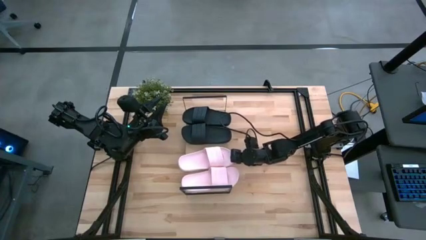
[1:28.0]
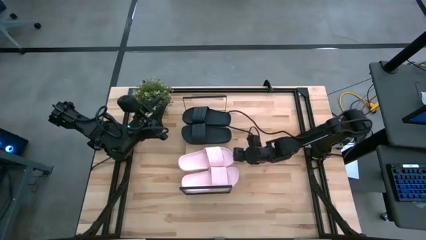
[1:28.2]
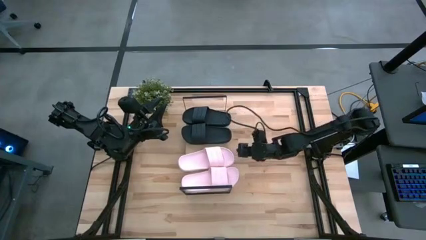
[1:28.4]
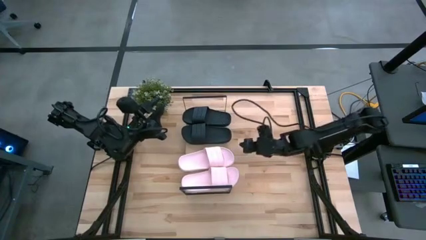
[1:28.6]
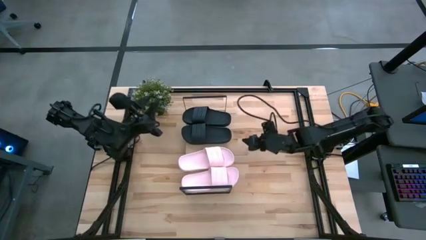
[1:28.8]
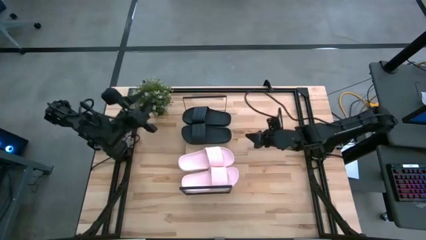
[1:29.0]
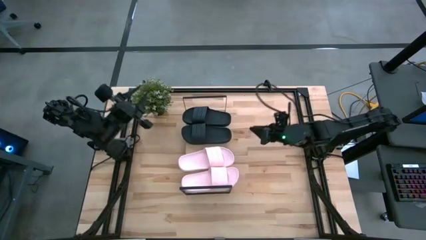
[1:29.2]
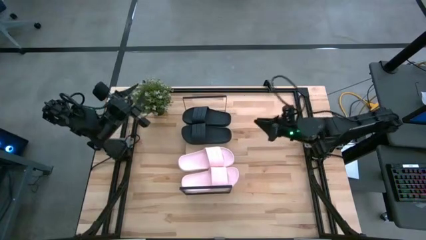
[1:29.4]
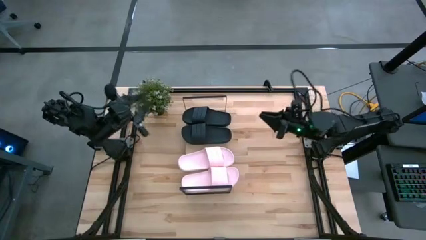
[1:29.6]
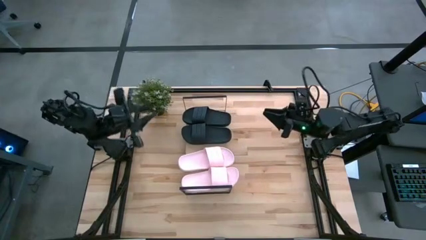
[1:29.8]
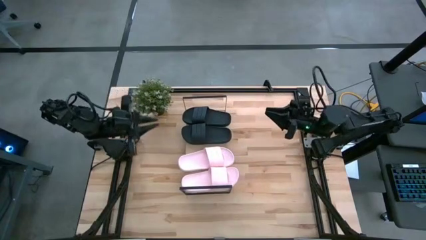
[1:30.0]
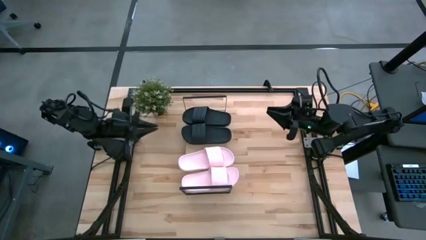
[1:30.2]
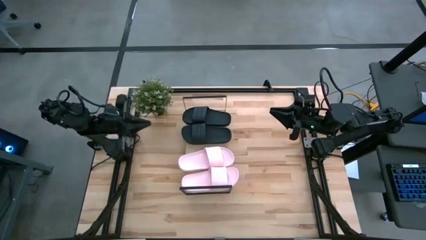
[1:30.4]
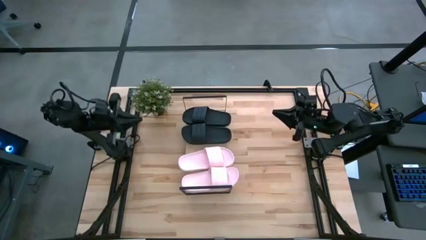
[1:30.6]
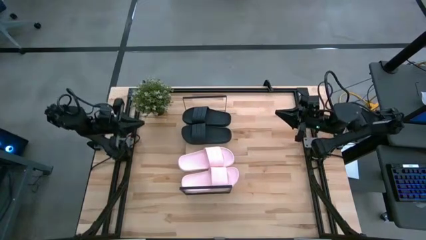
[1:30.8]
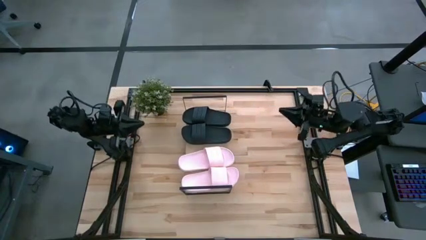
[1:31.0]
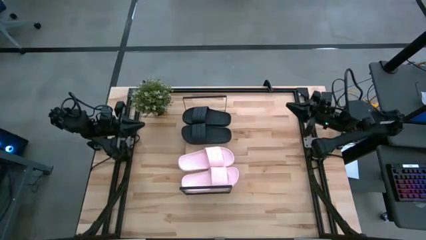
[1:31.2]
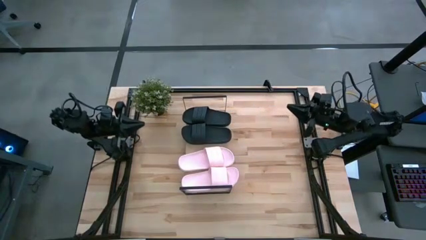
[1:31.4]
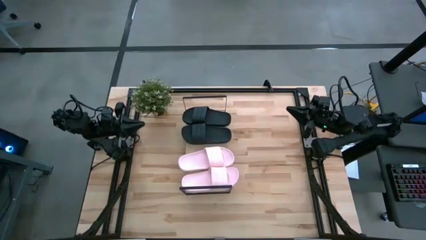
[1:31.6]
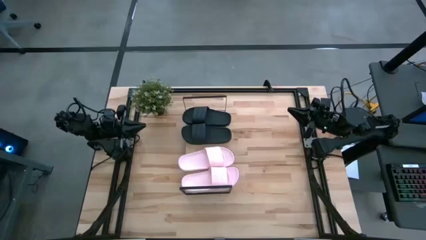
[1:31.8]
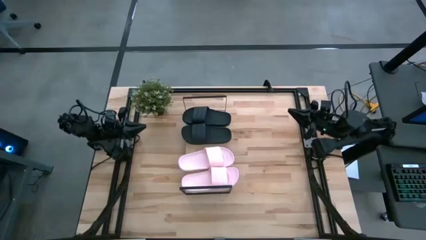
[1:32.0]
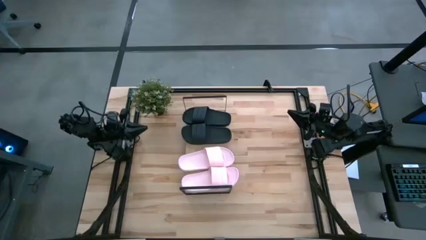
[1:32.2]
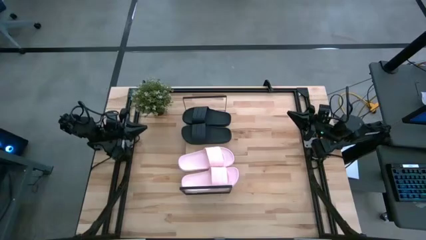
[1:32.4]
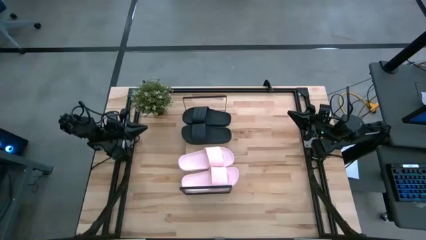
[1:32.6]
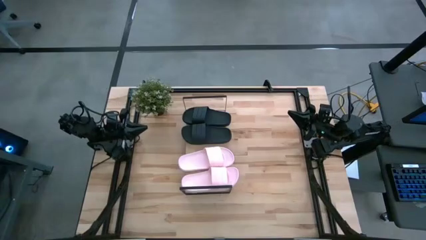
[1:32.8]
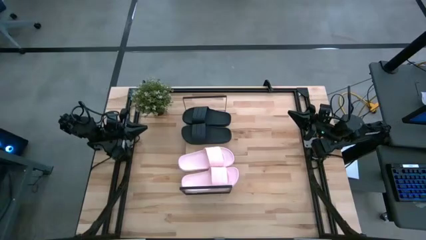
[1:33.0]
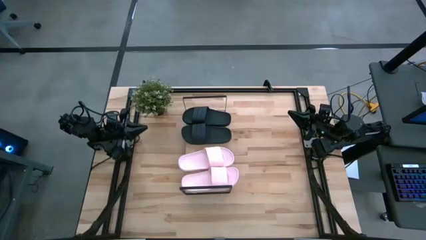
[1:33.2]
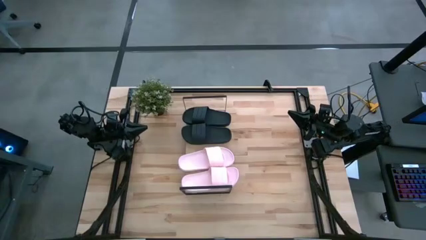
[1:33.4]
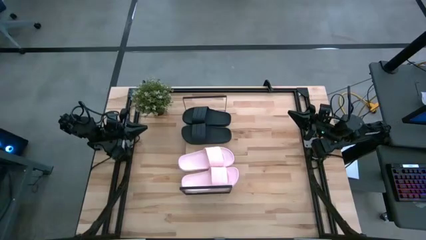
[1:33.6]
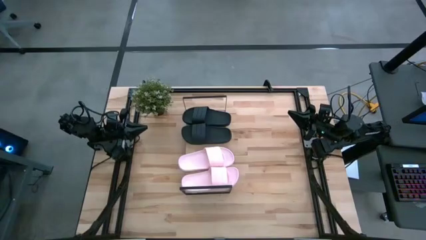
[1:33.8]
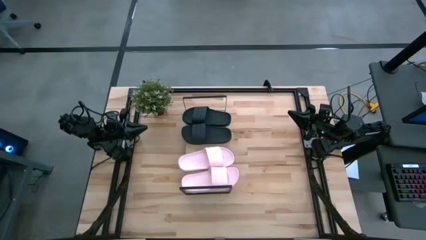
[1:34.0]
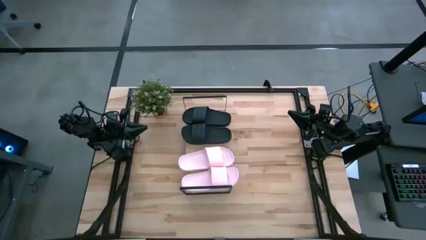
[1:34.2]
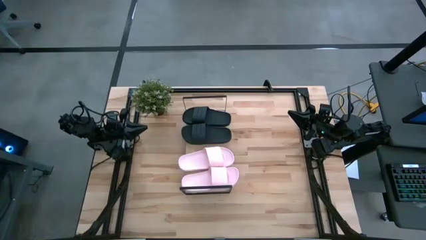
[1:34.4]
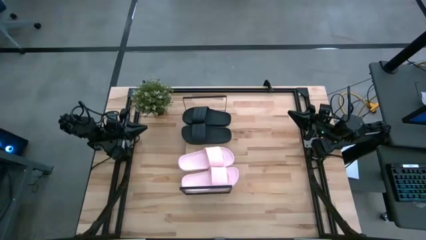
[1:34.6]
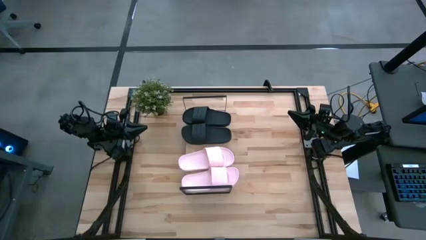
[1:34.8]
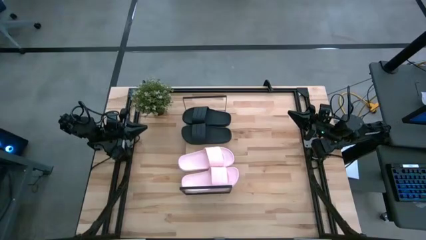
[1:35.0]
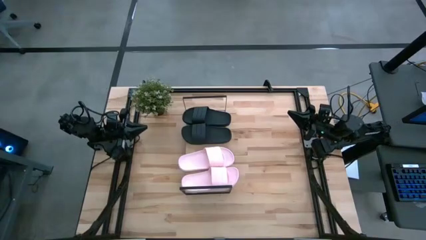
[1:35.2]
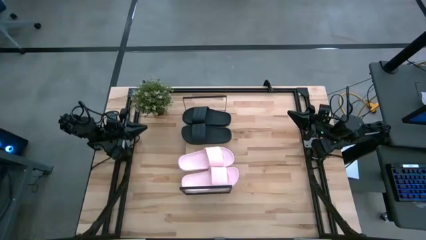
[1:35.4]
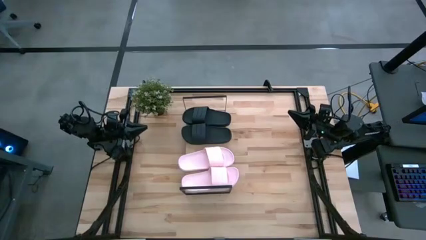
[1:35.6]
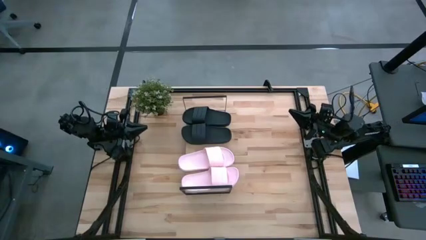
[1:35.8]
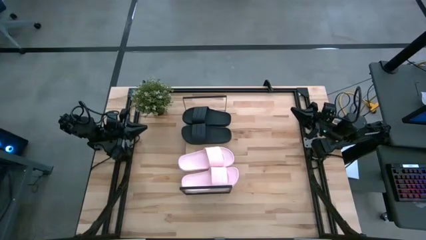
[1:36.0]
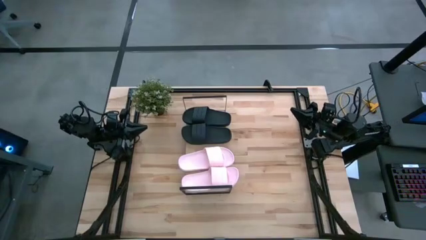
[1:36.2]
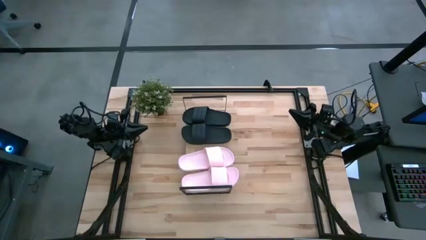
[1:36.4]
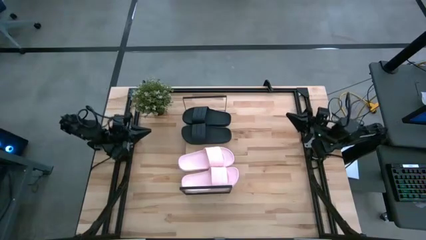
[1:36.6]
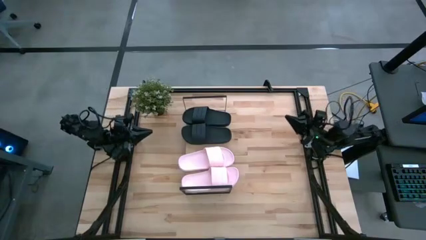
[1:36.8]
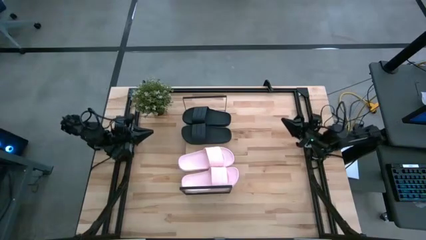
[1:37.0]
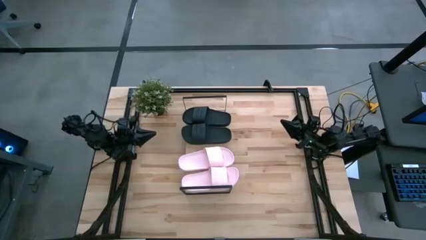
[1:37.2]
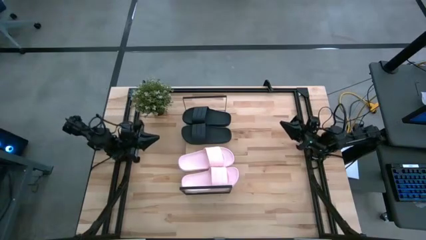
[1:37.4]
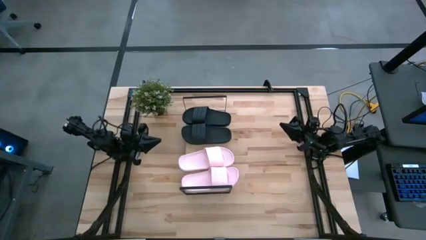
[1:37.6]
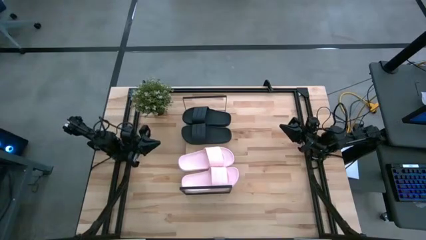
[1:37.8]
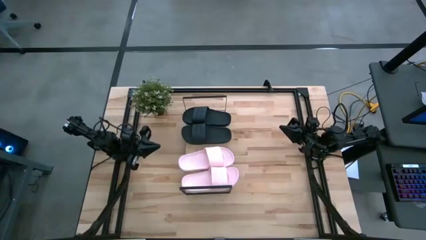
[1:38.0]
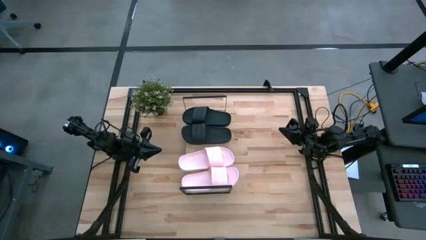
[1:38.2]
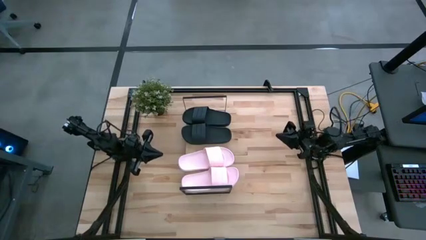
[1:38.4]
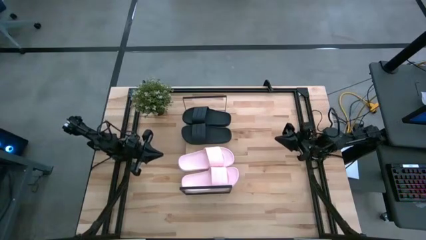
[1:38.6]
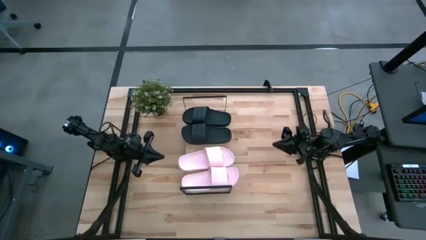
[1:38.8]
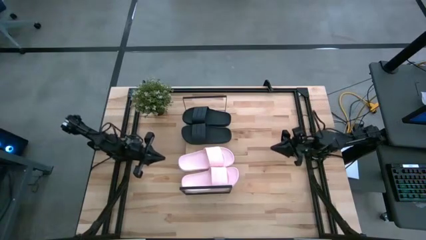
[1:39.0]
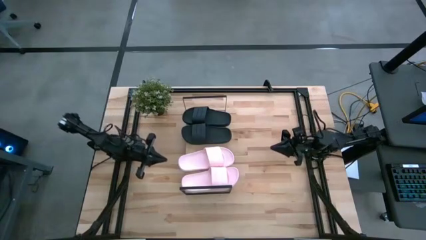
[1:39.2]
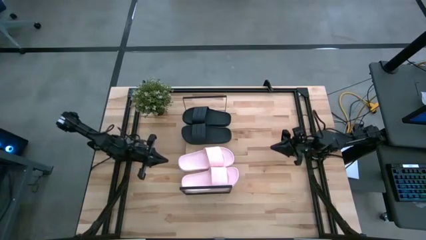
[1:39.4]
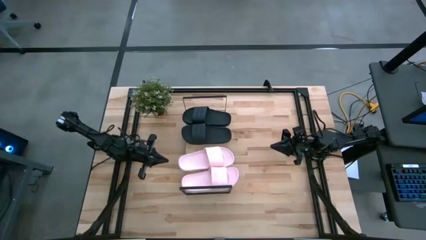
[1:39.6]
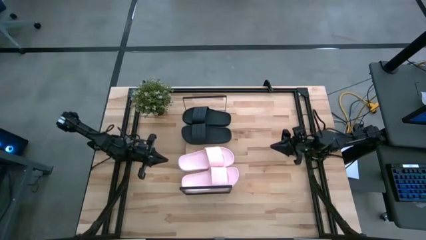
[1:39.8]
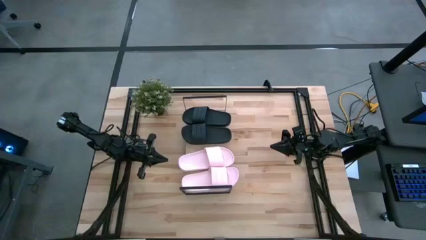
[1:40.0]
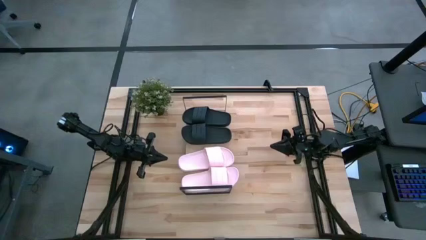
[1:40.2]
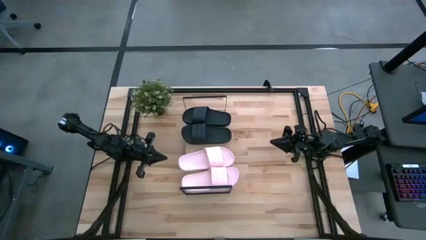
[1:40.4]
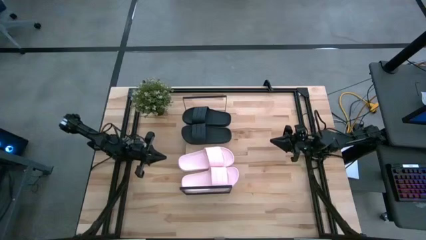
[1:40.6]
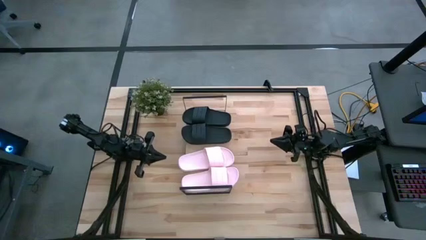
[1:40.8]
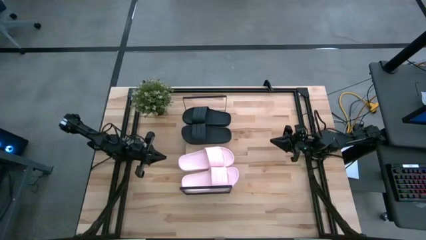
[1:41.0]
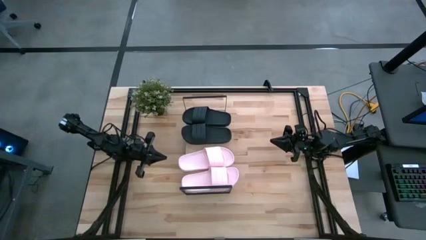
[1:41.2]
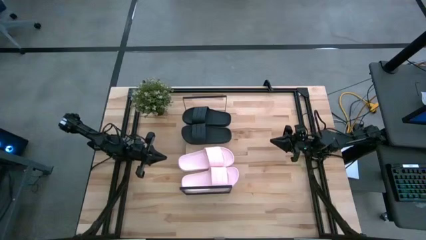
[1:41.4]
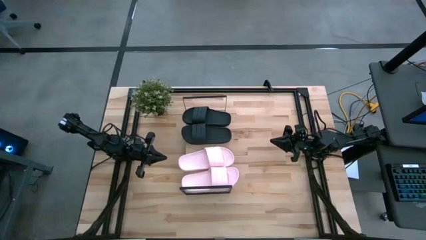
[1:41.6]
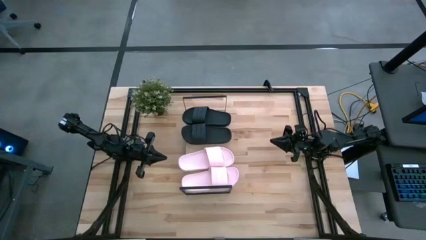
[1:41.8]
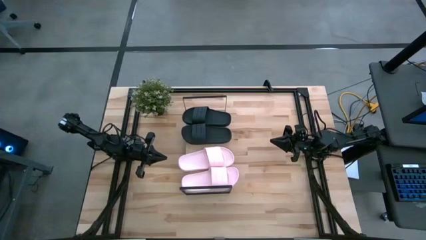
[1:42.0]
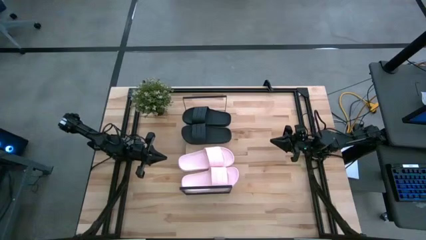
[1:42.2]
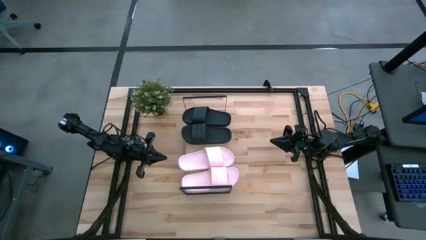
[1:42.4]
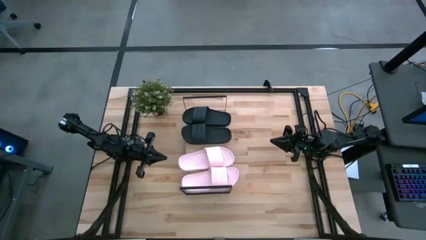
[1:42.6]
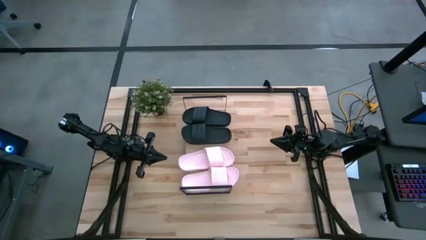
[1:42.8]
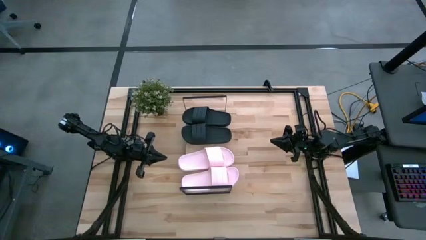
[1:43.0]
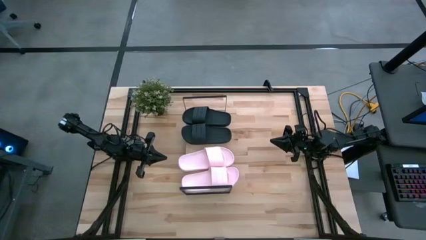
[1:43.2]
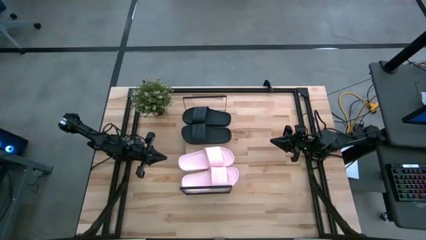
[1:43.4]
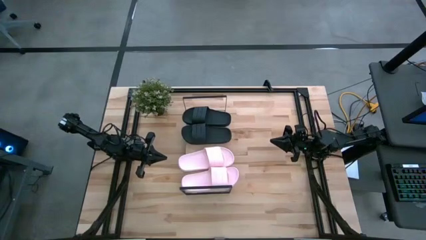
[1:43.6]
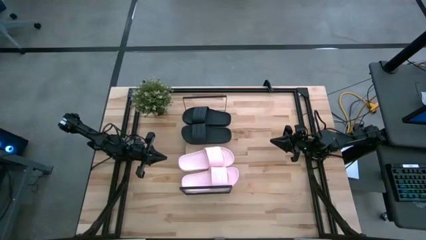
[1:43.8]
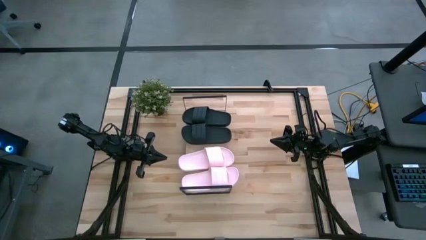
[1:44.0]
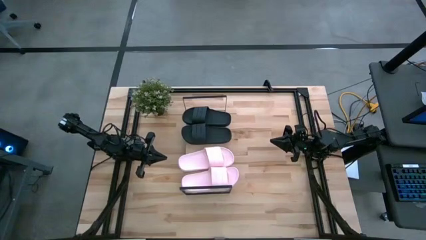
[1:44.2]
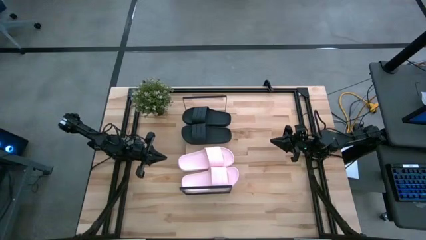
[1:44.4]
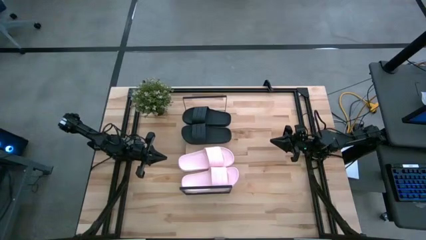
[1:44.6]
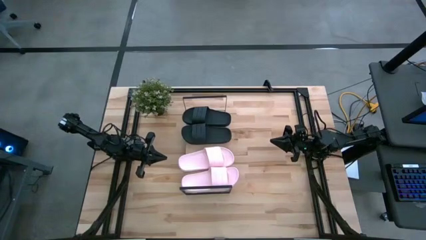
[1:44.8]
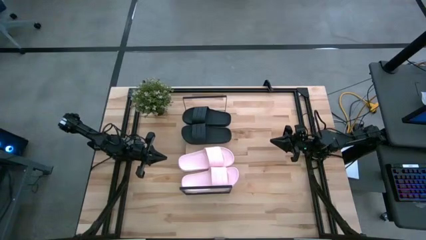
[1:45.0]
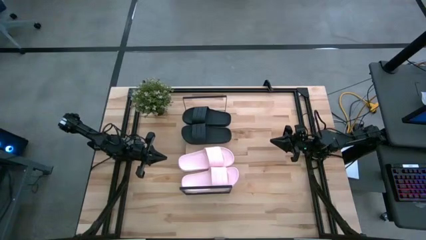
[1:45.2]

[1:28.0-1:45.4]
Task: Pick and place slides into the shelf
Return to Home Position
